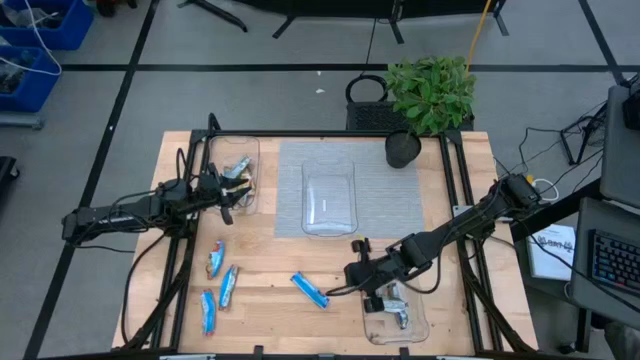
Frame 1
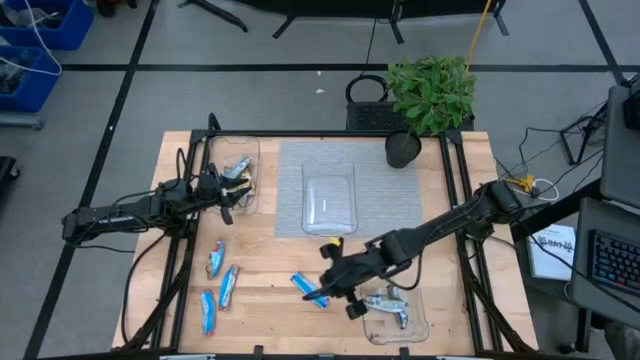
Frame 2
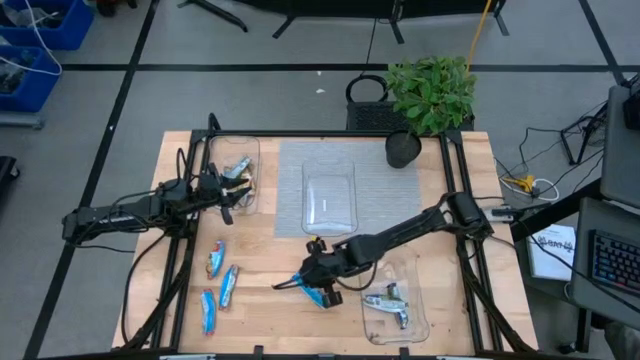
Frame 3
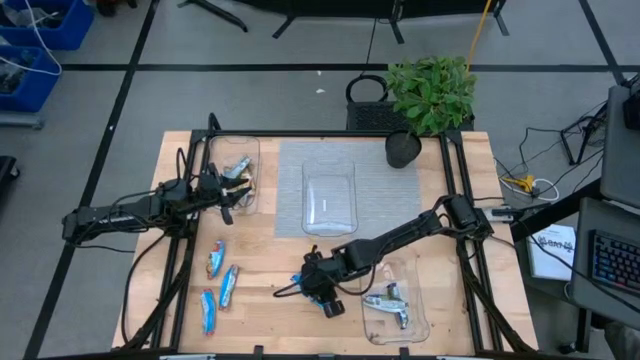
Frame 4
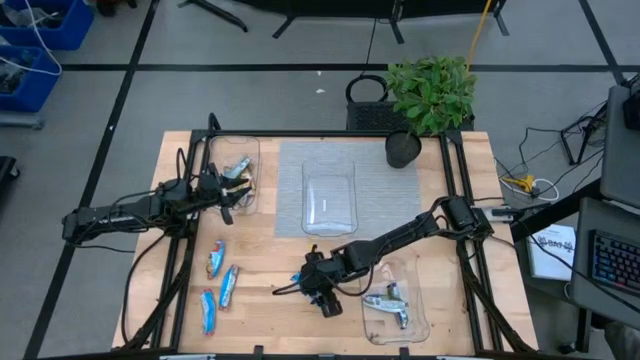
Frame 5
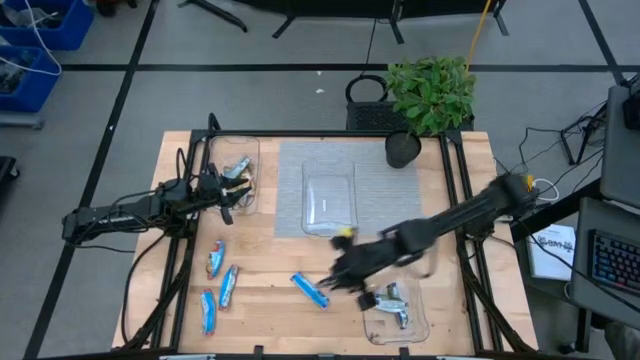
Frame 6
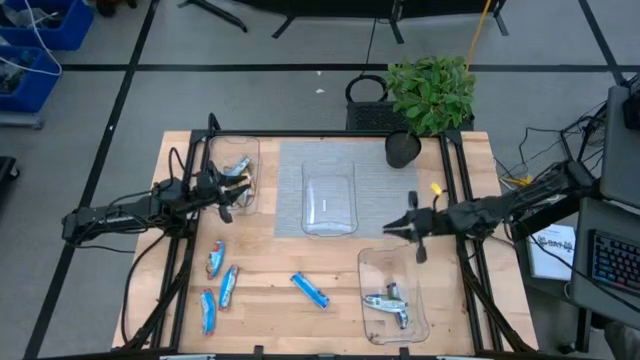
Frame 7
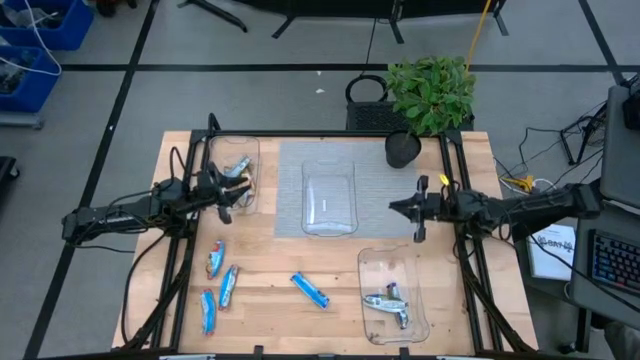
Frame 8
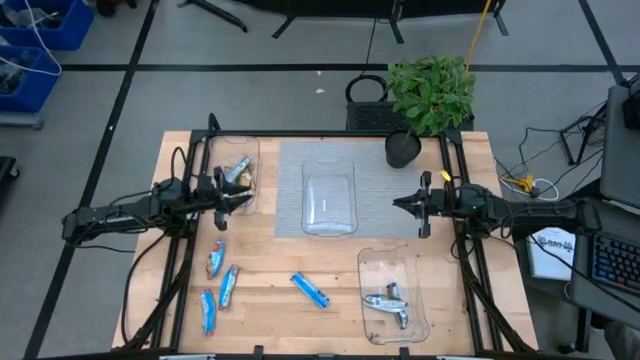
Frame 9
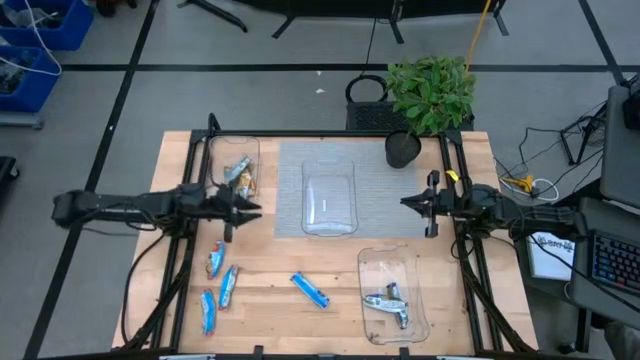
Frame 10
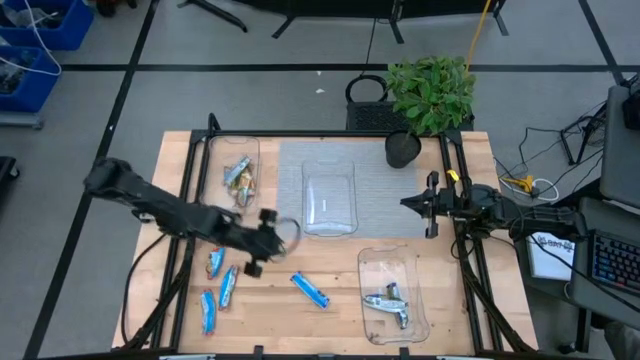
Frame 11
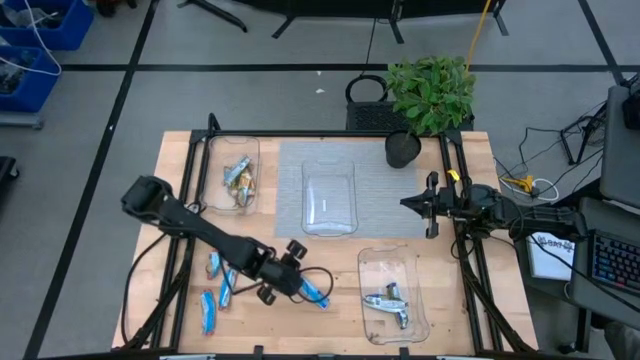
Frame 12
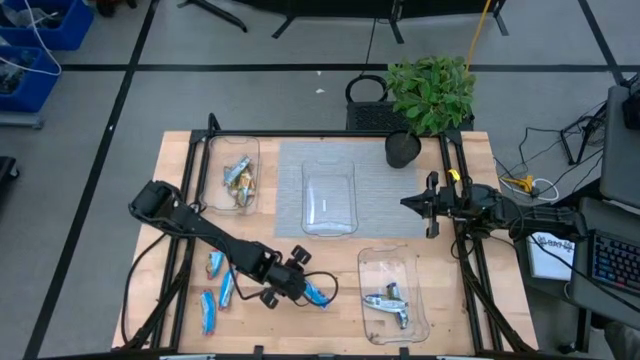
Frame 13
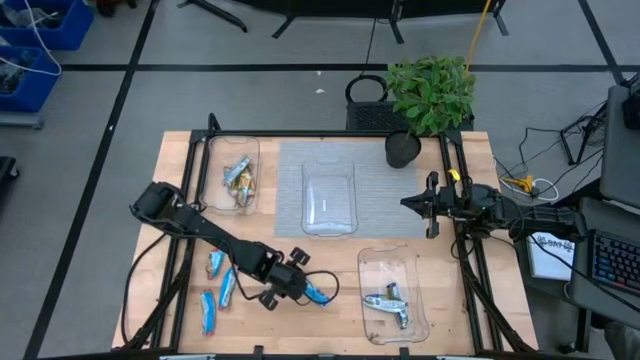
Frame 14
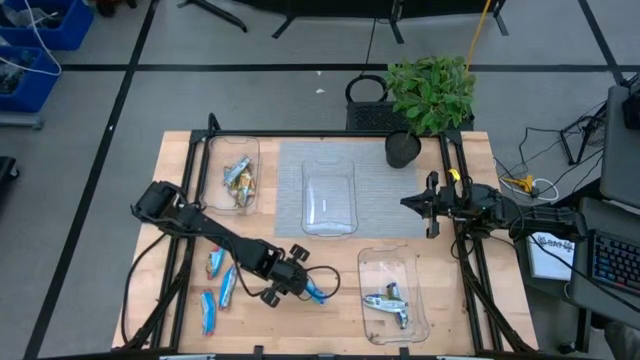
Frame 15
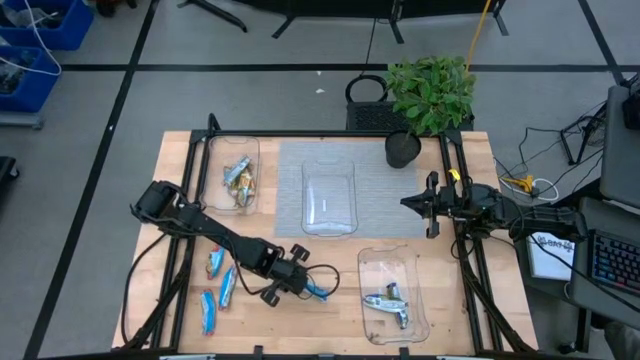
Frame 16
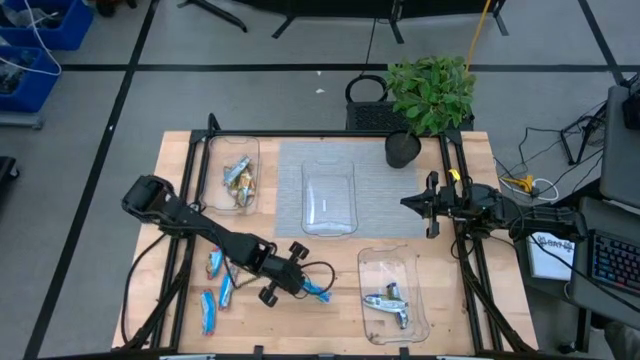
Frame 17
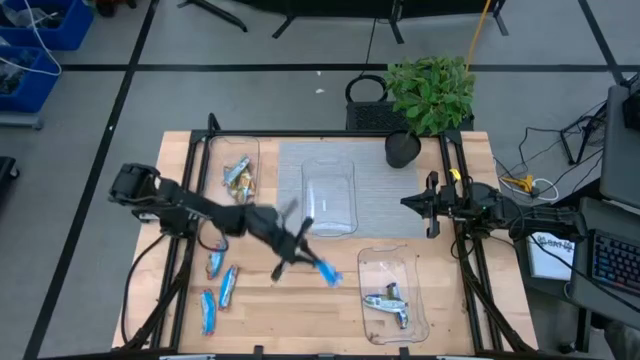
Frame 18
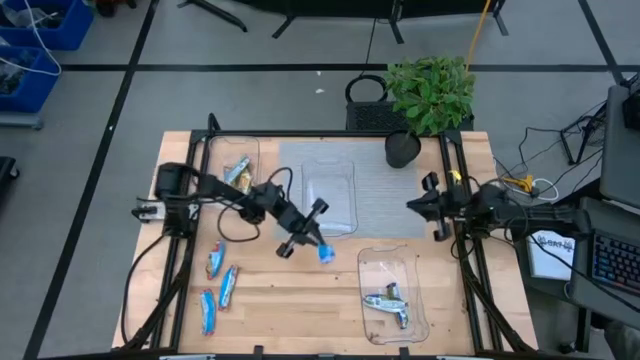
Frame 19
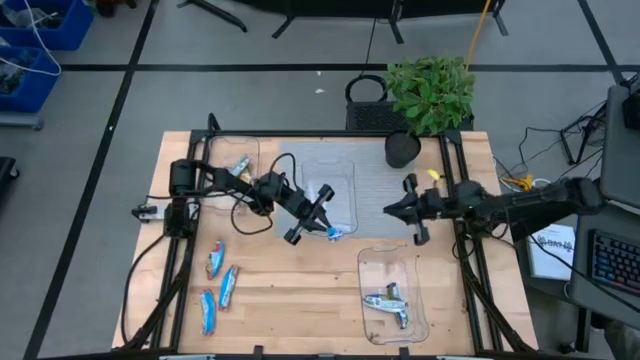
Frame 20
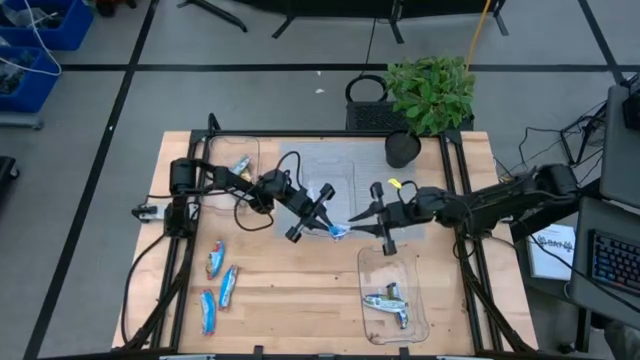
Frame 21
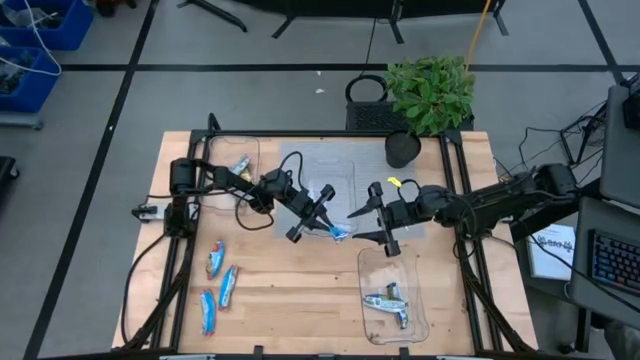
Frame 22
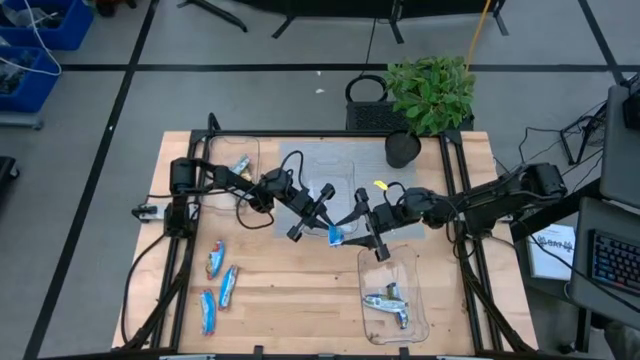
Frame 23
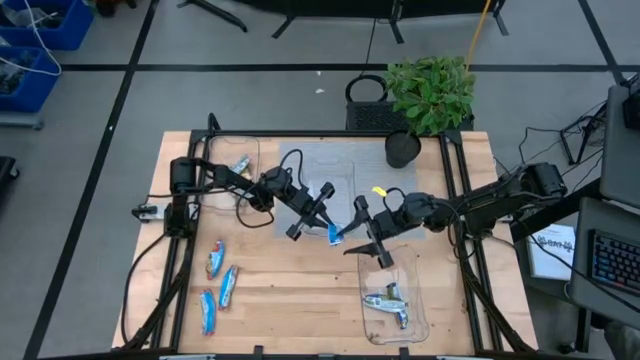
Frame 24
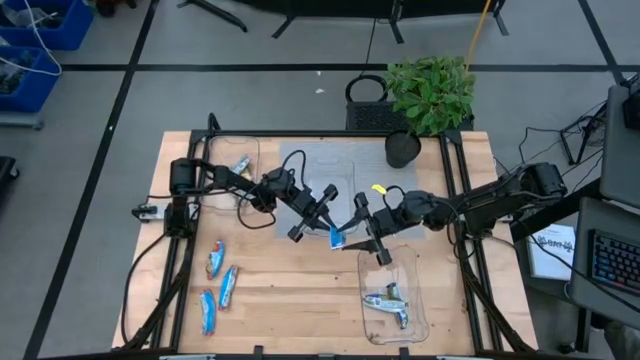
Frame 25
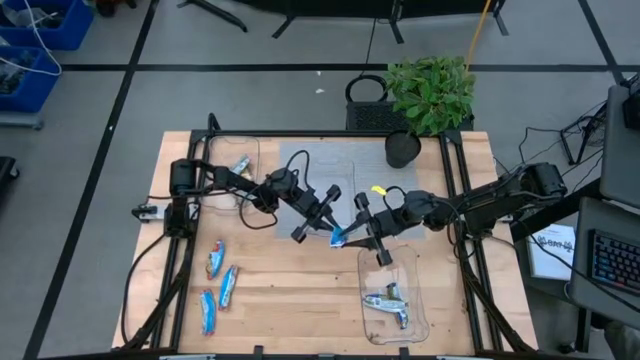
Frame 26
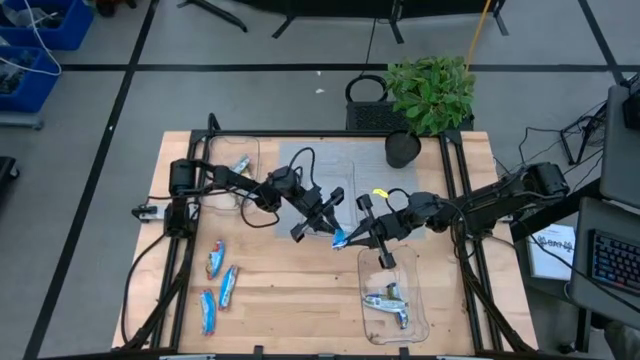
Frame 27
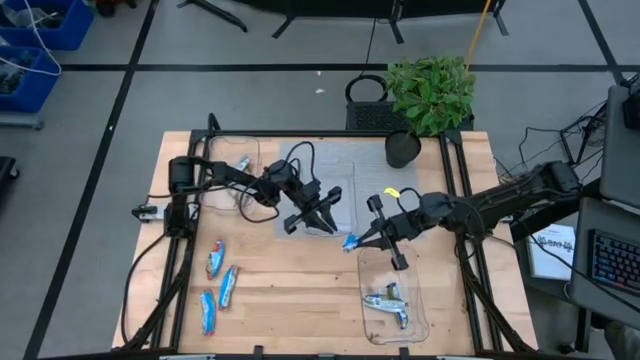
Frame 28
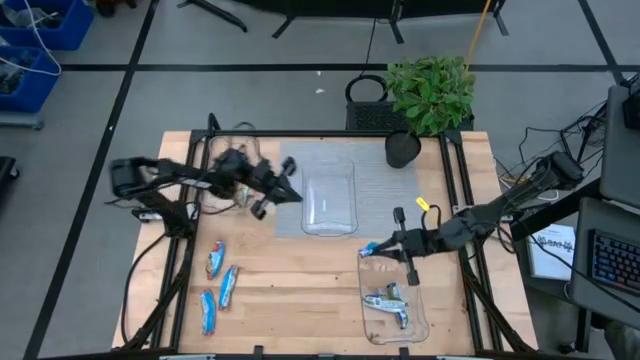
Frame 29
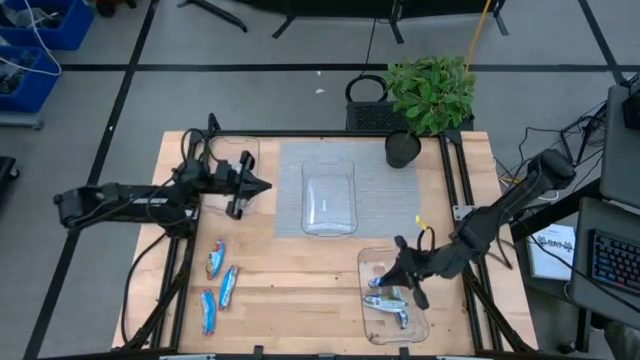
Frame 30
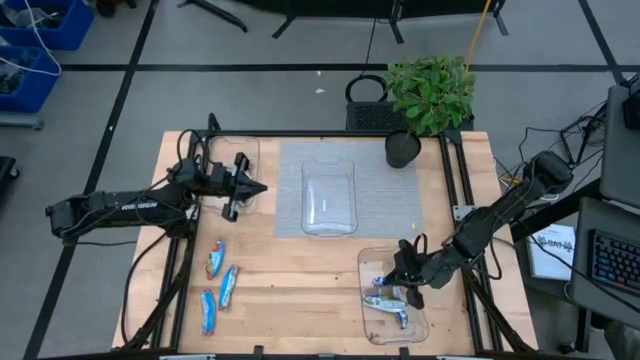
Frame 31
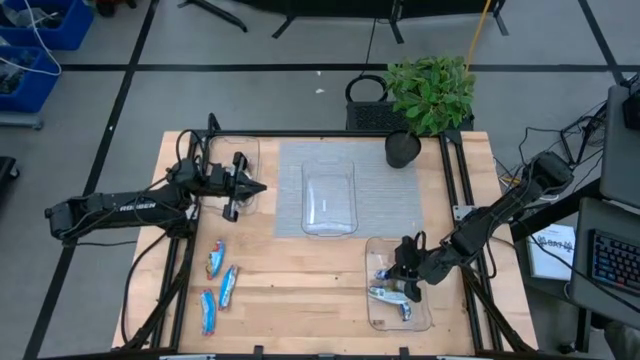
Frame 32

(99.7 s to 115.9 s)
Task: Pick and place Granola Bars by type
Put the blue granola bar into the bottom right transparent bin

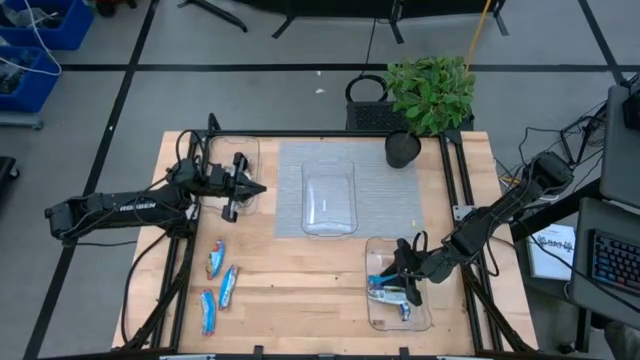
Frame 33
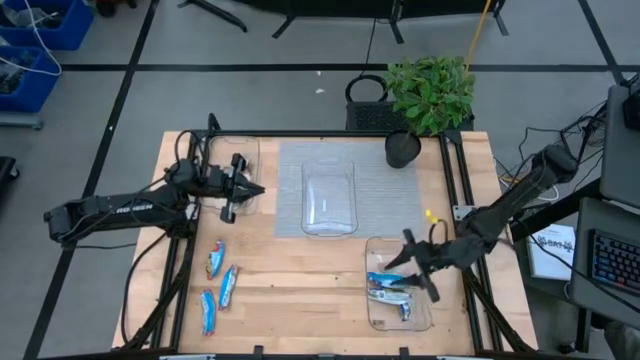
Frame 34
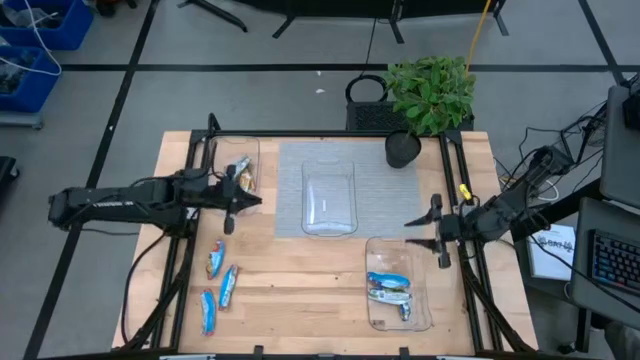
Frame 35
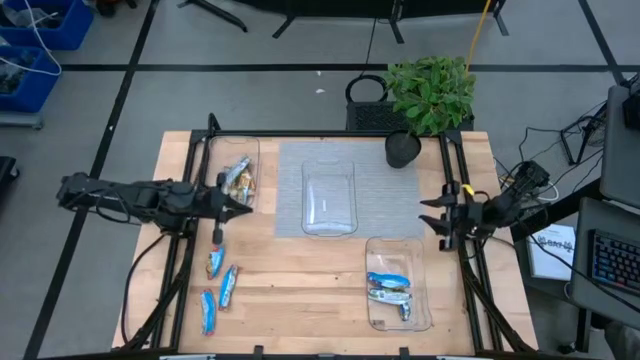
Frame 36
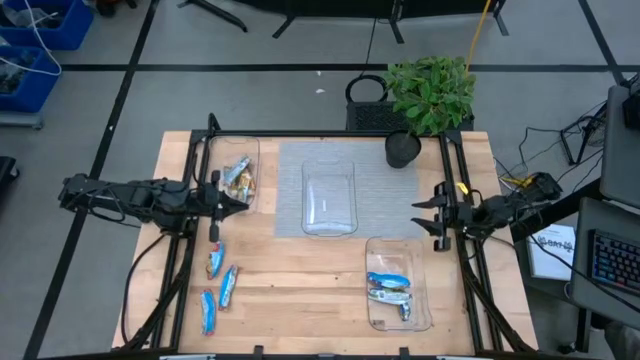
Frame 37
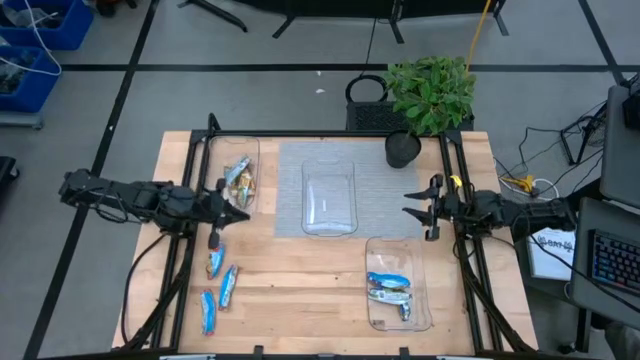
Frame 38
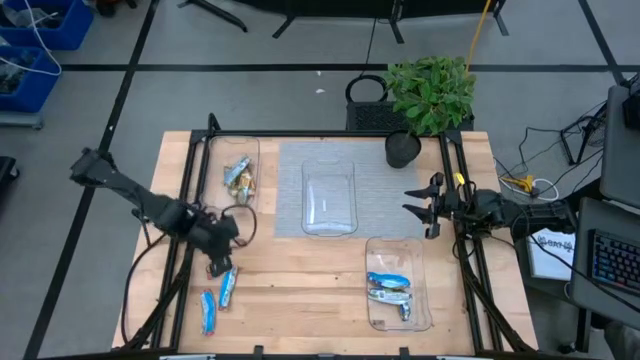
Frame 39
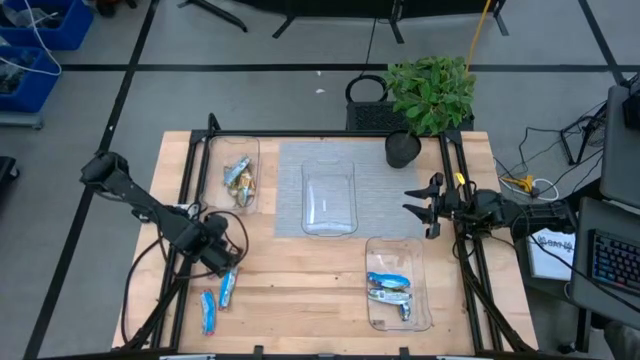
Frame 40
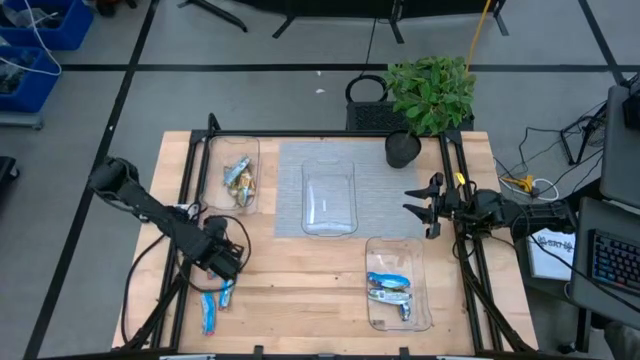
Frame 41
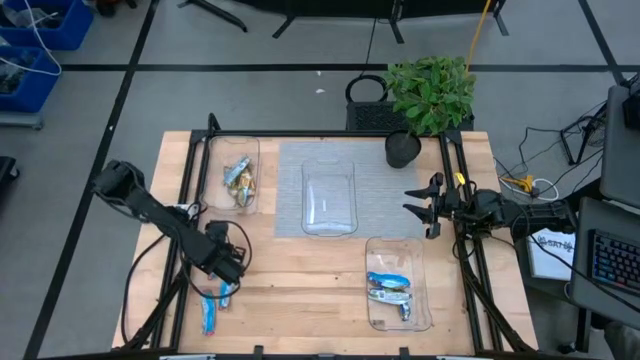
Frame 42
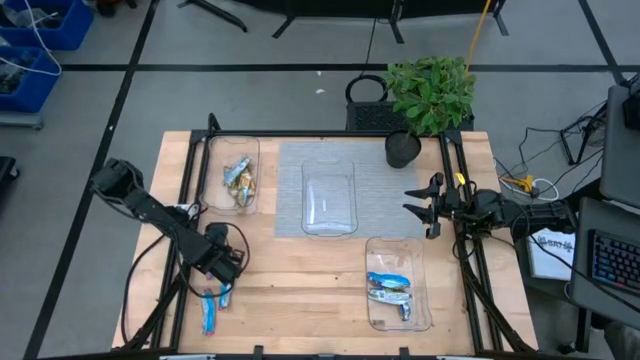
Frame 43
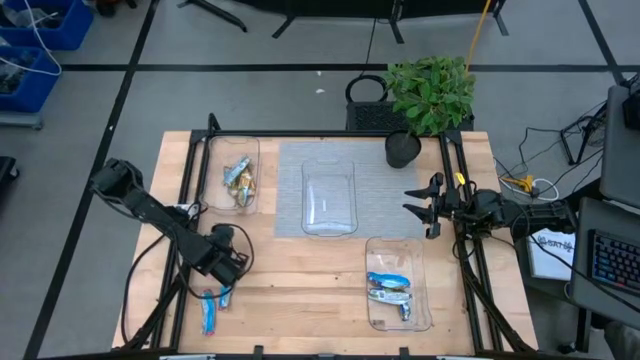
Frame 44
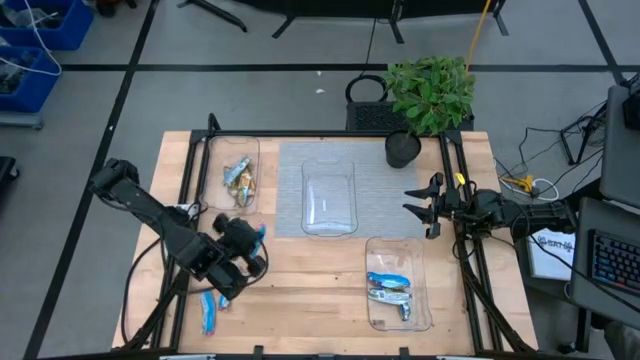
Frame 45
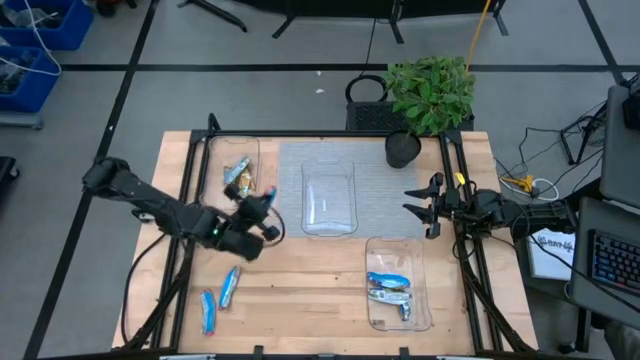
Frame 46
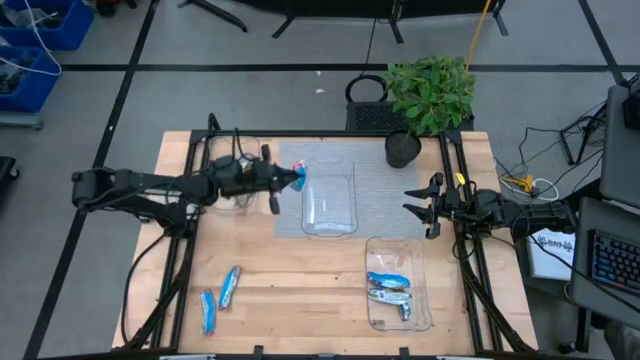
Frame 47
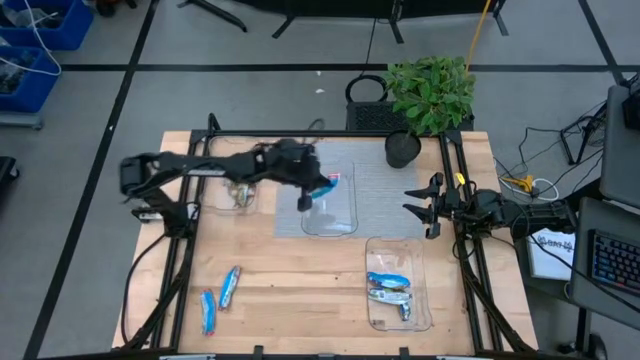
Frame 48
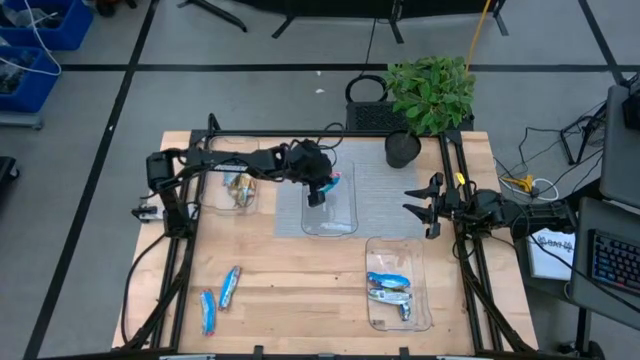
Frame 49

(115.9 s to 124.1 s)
Put the red granola bar into the top right transparent bin
